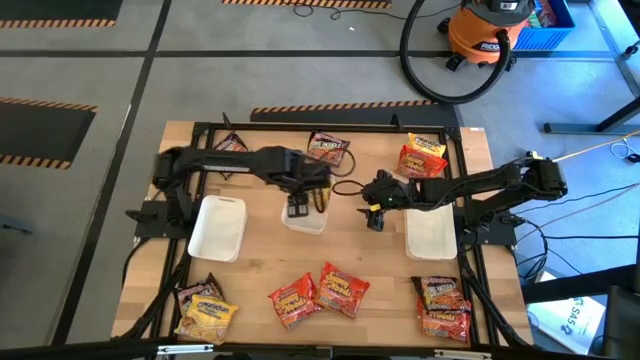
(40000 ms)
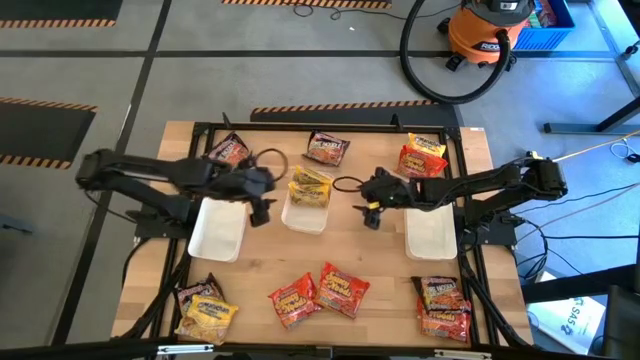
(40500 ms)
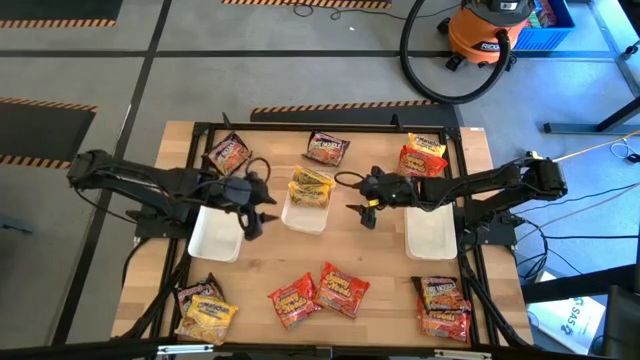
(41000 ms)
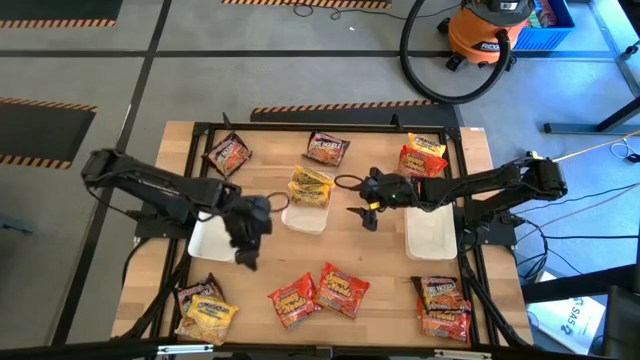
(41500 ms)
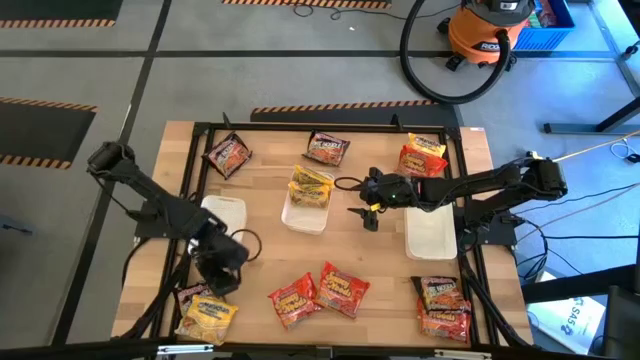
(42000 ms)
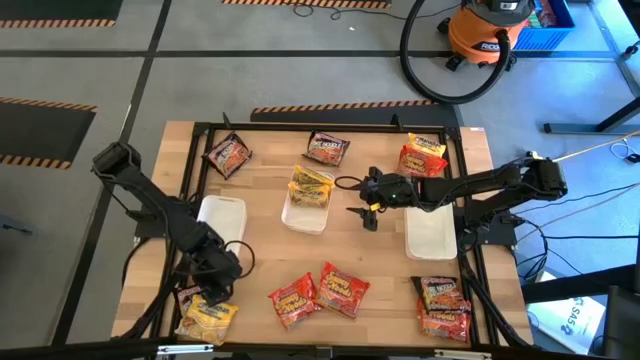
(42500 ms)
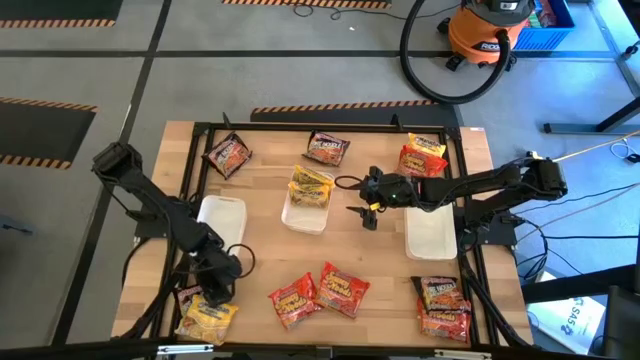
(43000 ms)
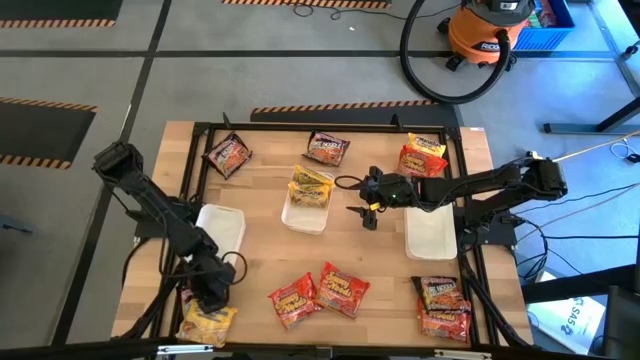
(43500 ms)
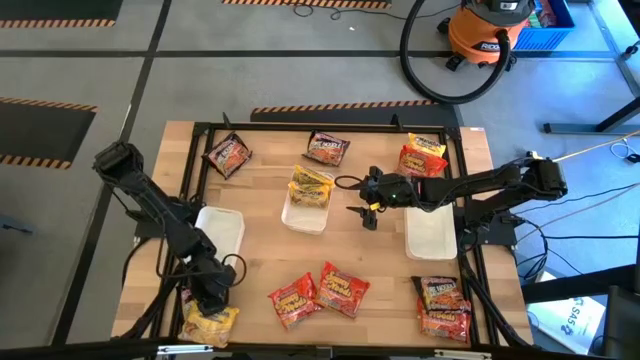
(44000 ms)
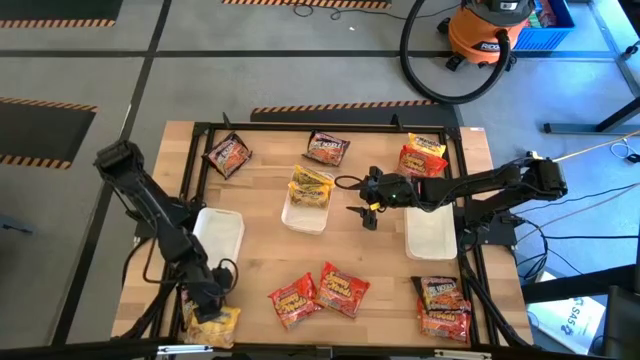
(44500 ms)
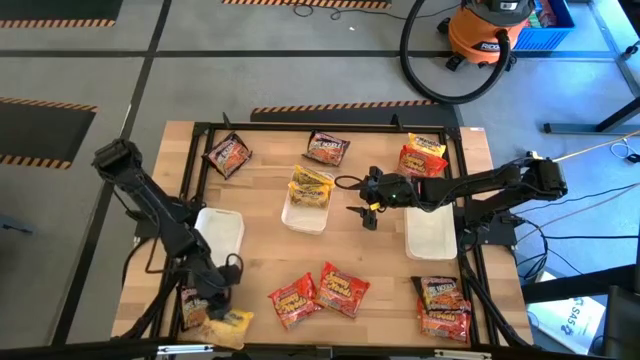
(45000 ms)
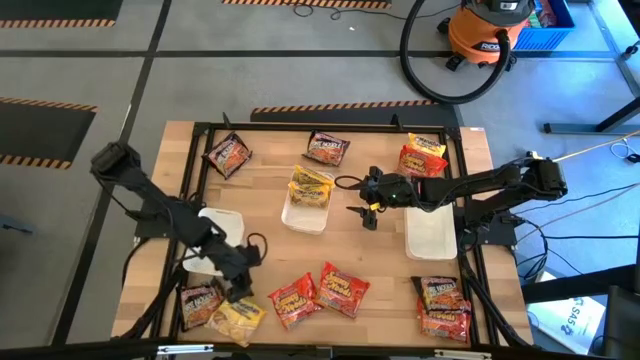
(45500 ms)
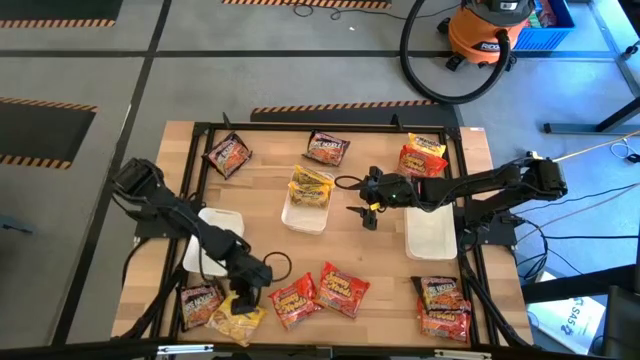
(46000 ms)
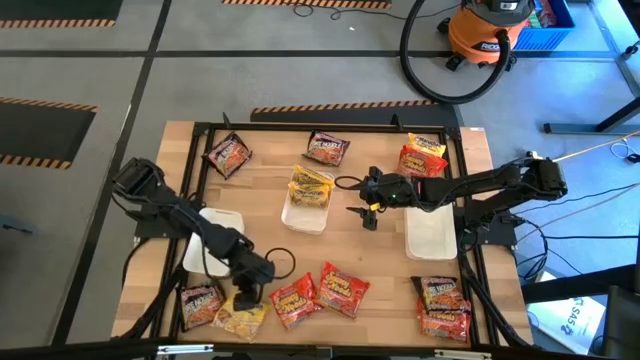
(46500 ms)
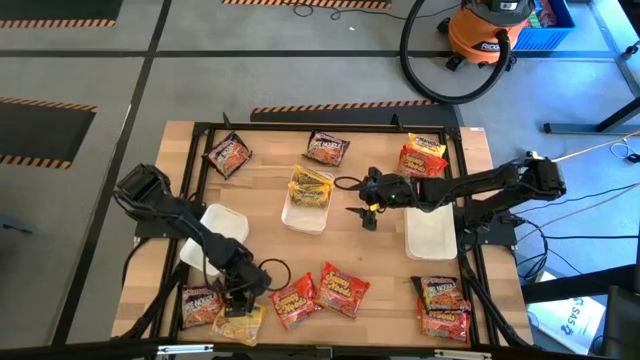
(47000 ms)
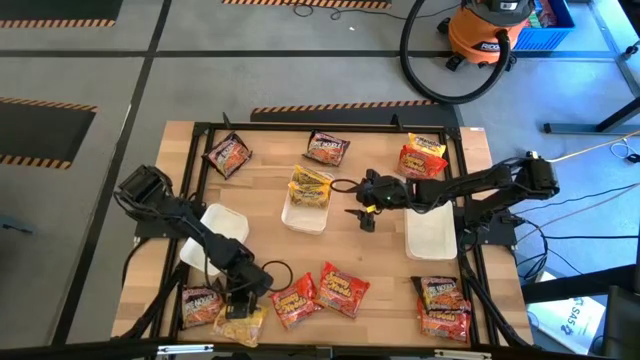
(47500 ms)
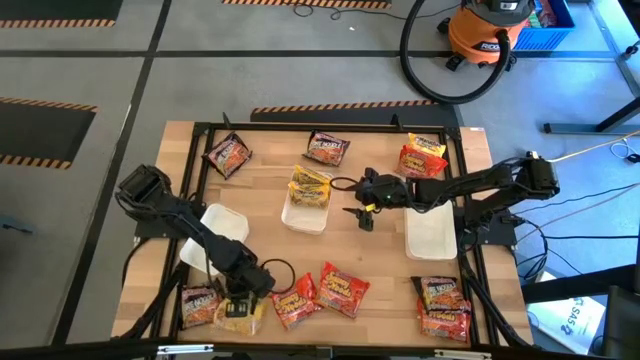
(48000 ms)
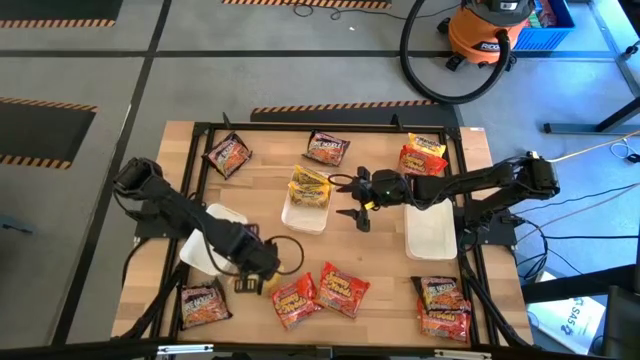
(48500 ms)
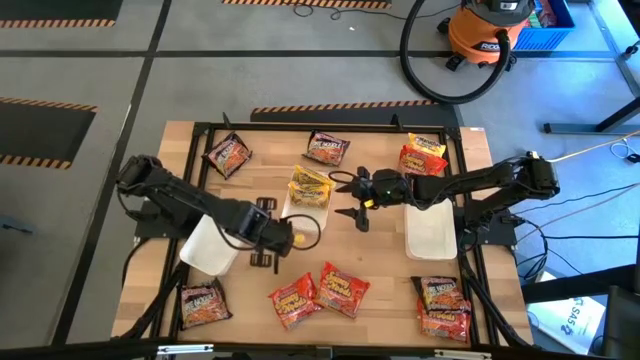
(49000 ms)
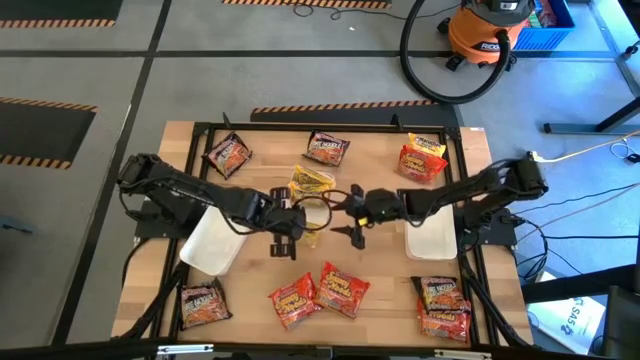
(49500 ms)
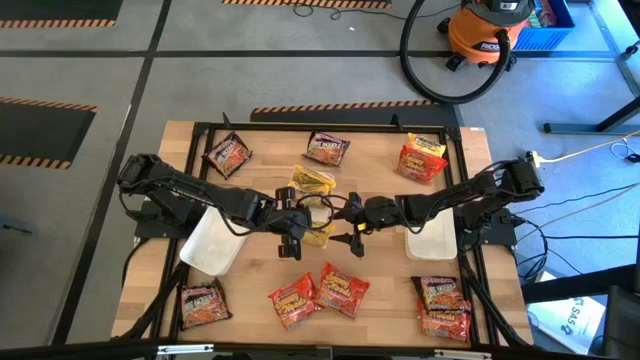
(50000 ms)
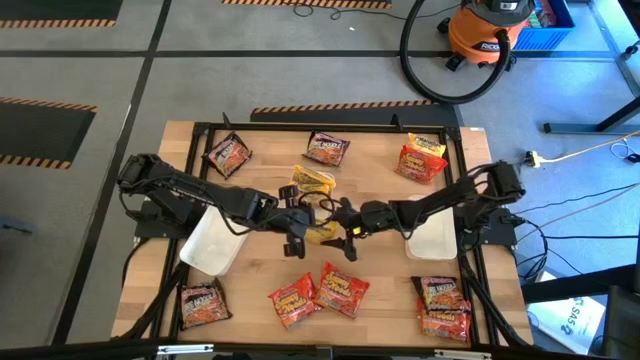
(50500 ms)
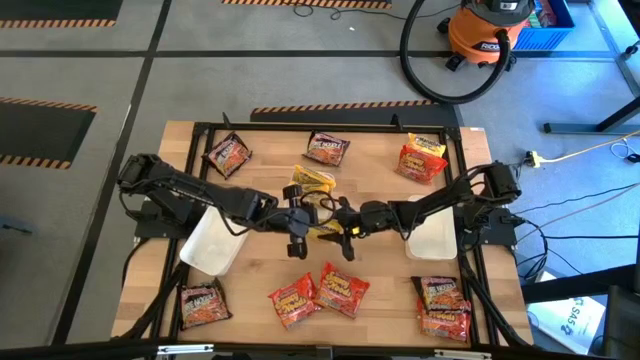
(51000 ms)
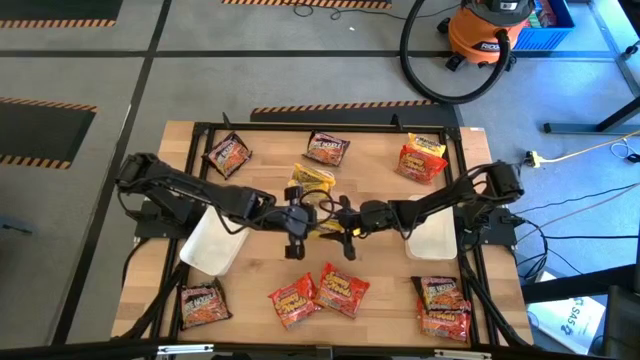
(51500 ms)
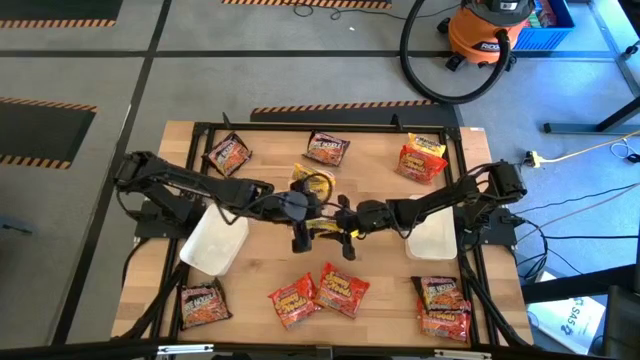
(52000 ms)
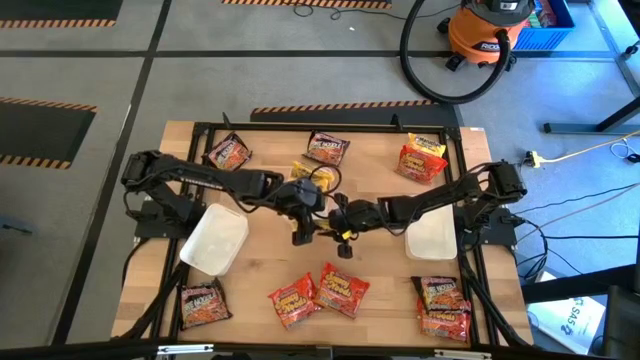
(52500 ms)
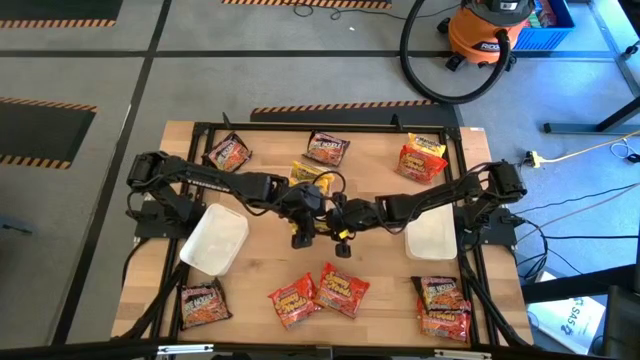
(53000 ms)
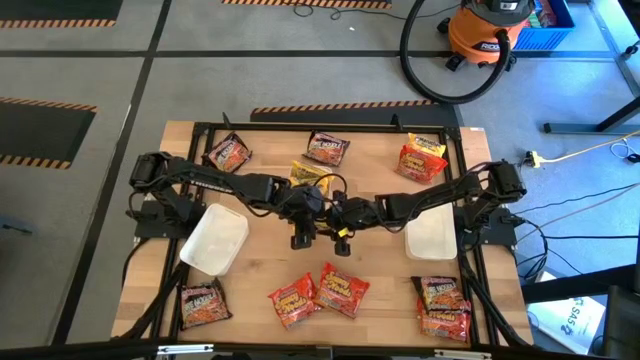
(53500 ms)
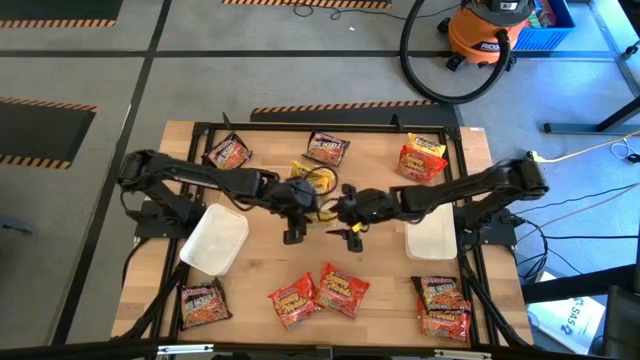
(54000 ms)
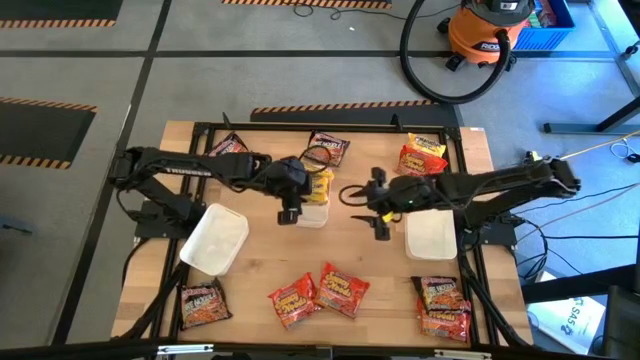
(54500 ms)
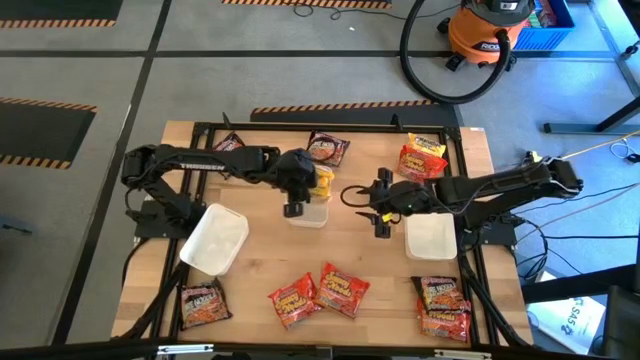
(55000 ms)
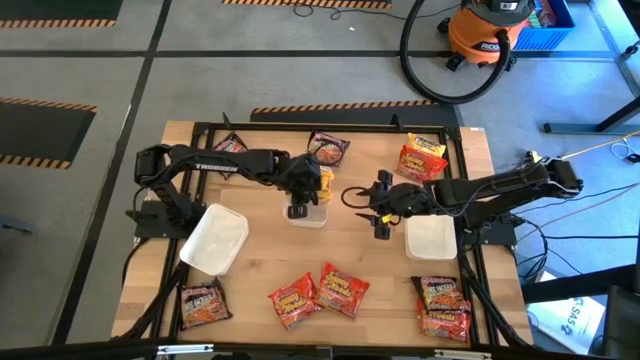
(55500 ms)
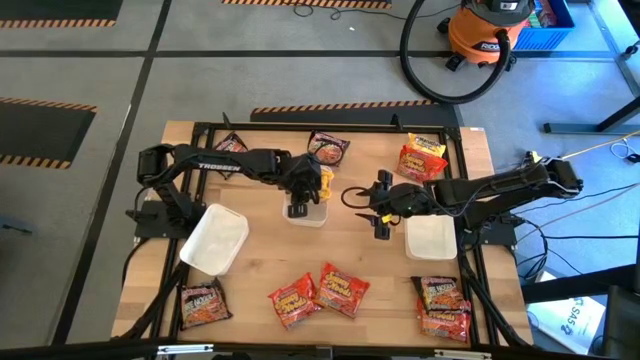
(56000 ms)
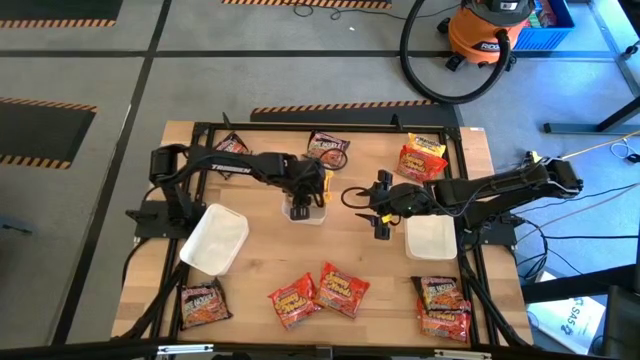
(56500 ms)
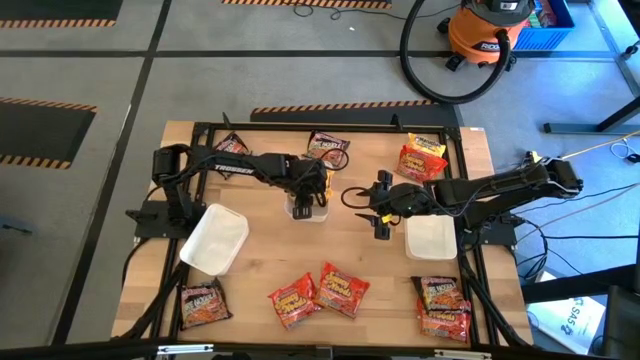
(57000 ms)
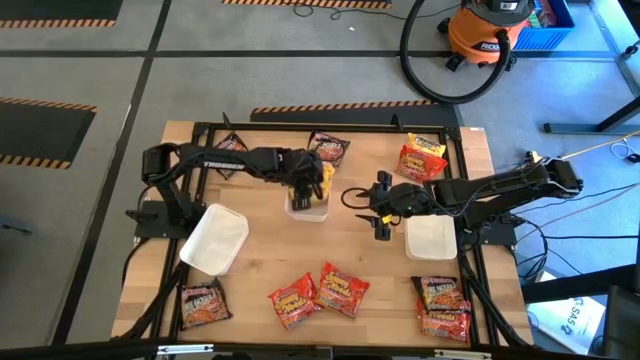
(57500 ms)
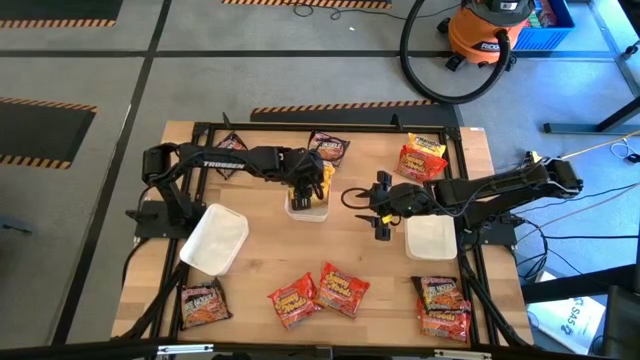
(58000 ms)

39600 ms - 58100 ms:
Task: Sort Maruchan noodles
Put the bottom yellow noodle pack into the center white bin

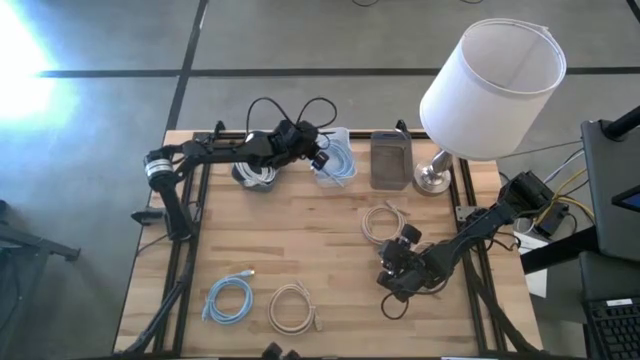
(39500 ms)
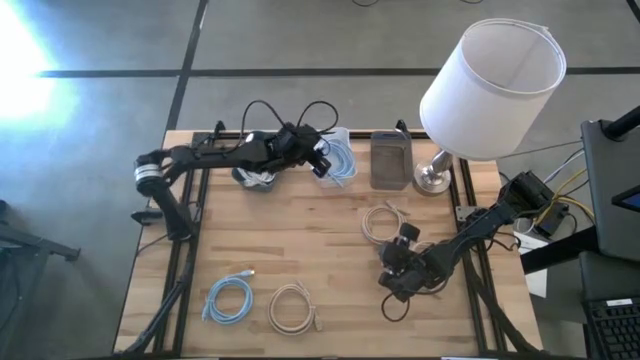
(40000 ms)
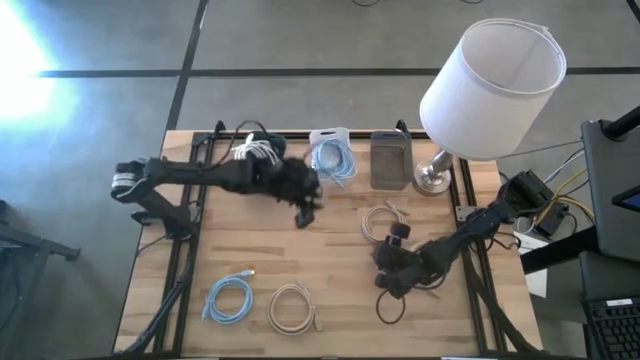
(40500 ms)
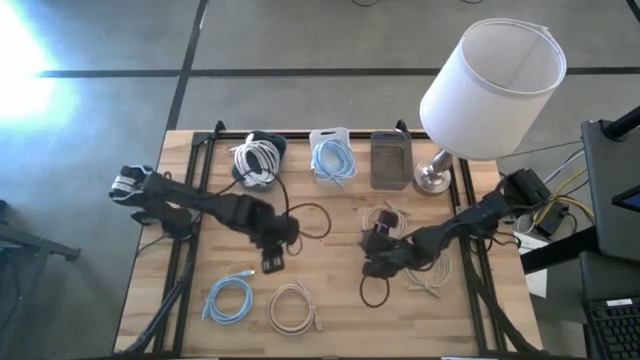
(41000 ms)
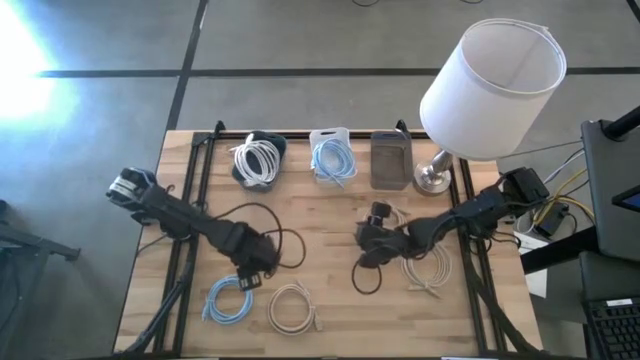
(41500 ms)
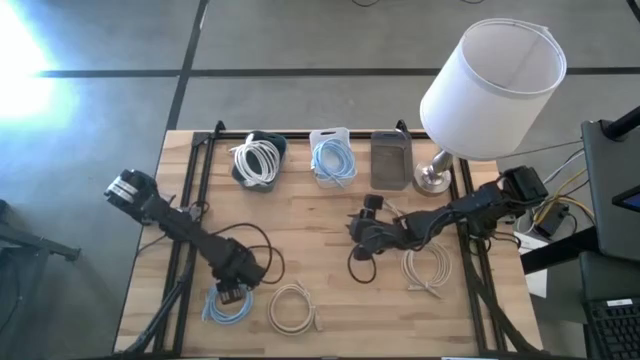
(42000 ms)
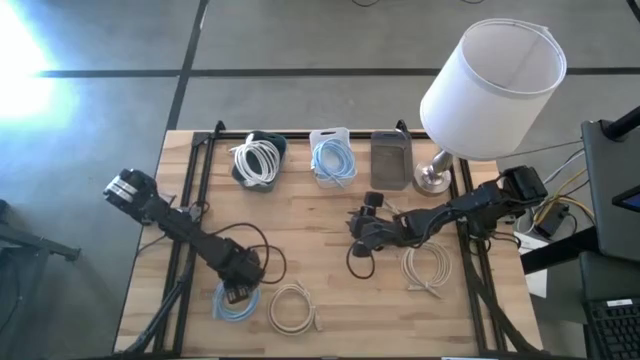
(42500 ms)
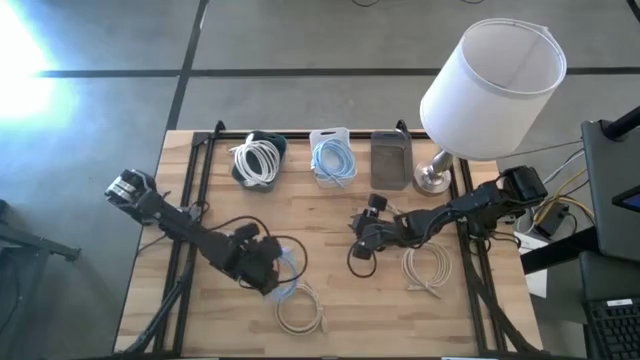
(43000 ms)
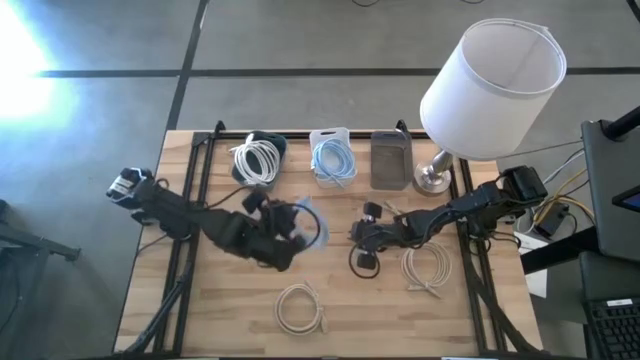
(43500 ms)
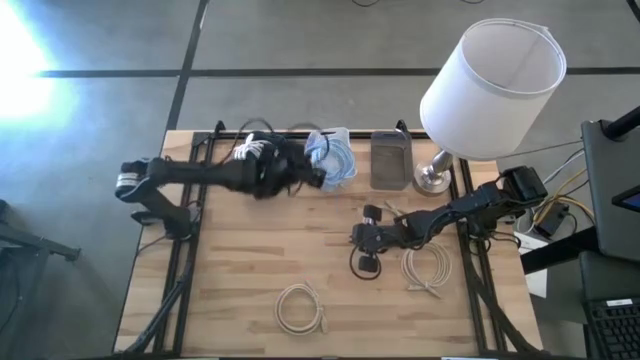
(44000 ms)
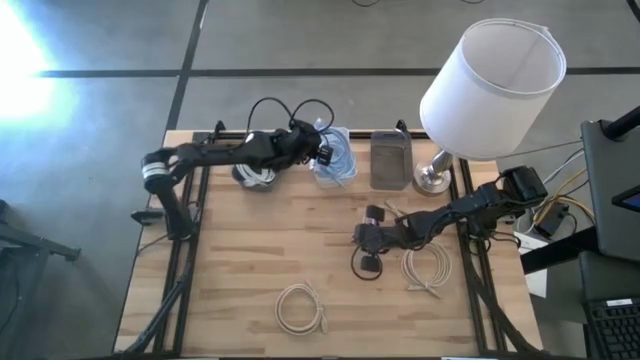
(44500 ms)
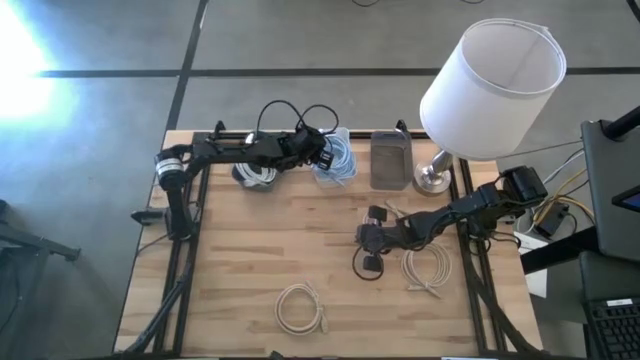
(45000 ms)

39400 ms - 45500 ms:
Task: Sort HDMI cables
Put the blue HDMI cable into the white bin
